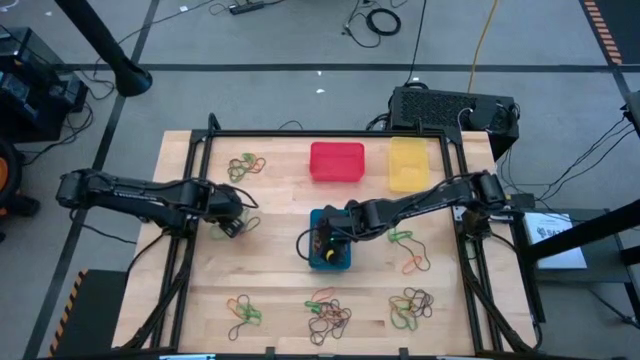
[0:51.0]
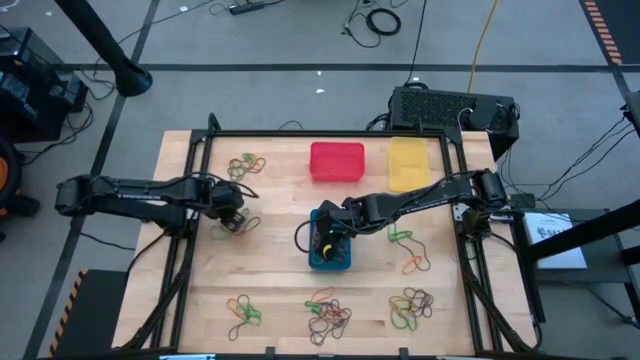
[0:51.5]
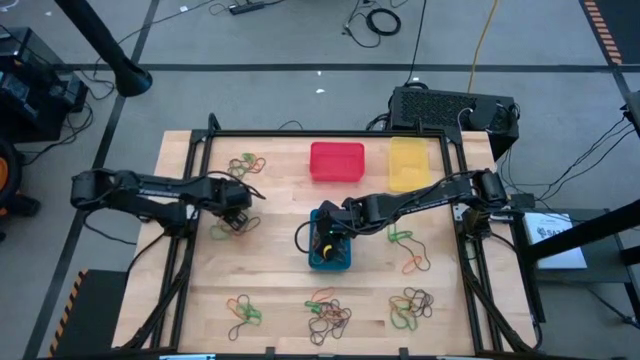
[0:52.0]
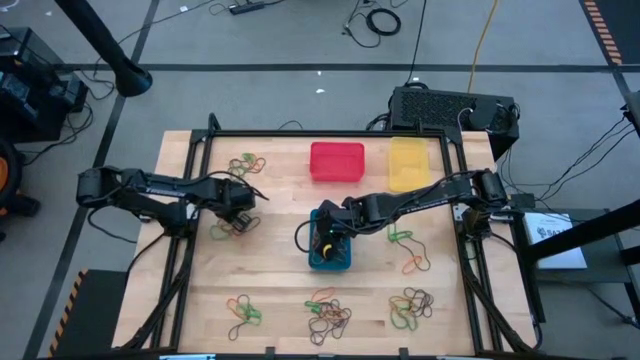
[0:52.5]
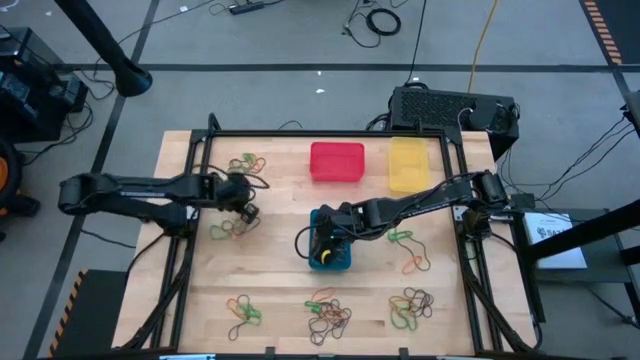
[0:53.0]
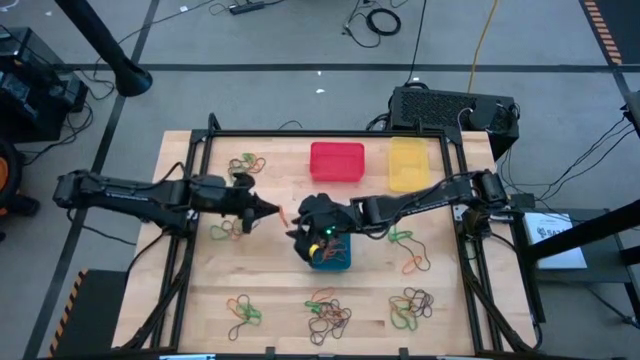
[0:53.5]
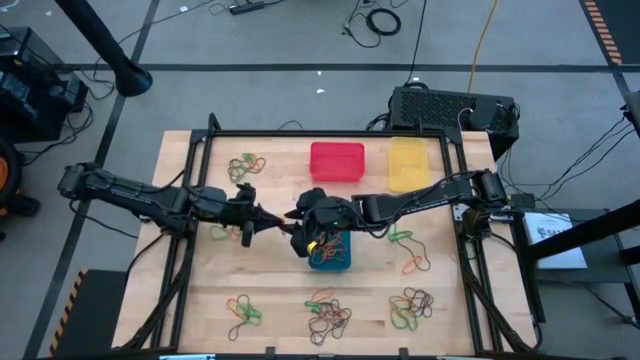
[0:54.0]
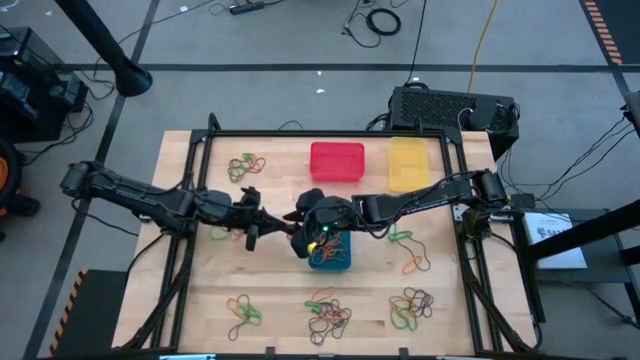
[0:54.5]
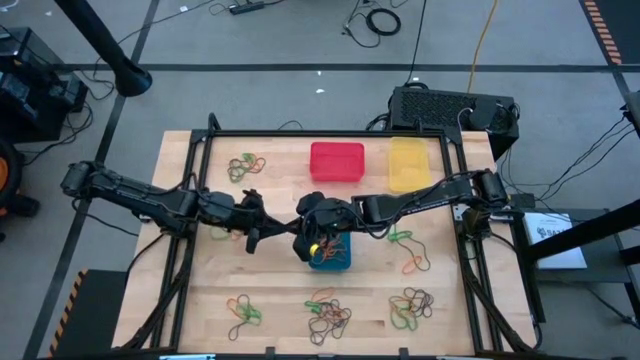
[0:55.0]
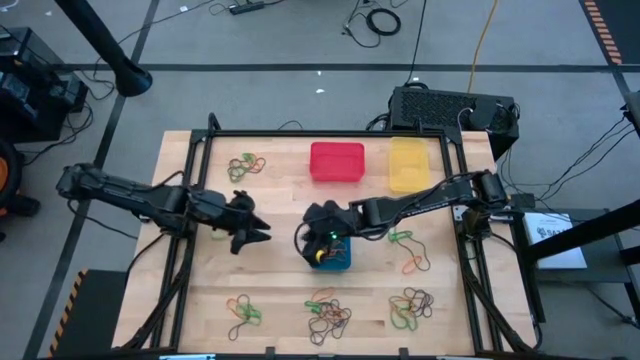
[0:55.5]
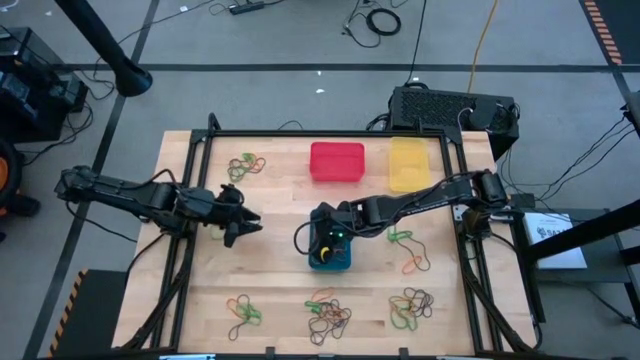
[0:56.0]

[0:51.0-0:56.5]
Task: Sort rubber bands into baskets
Put the orange rubber band into the blue bin

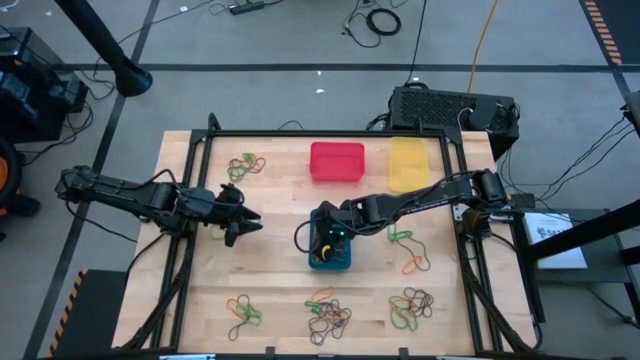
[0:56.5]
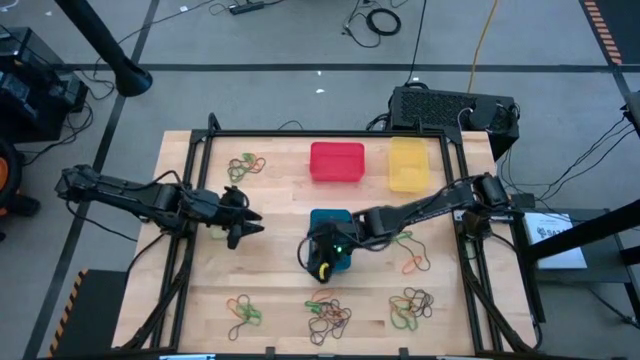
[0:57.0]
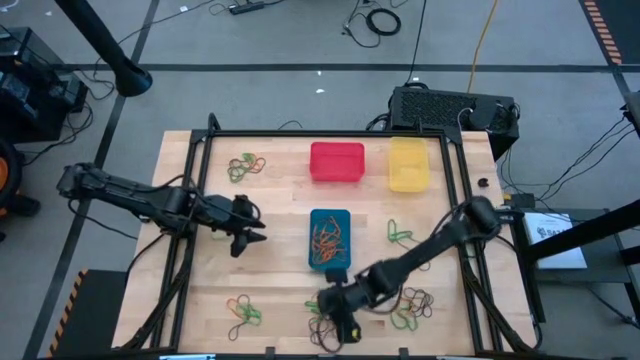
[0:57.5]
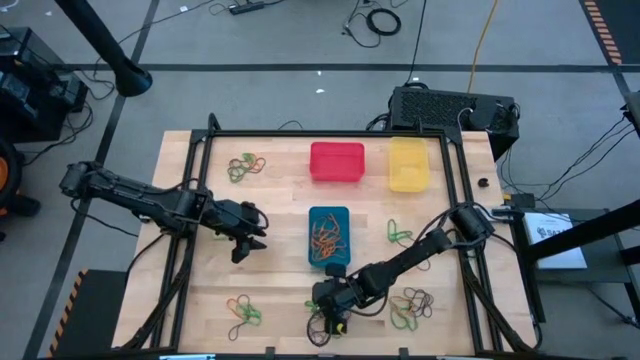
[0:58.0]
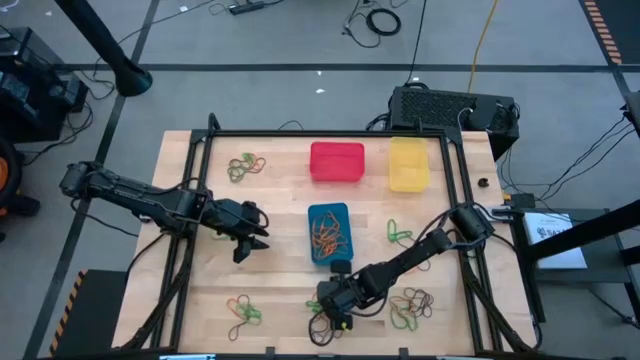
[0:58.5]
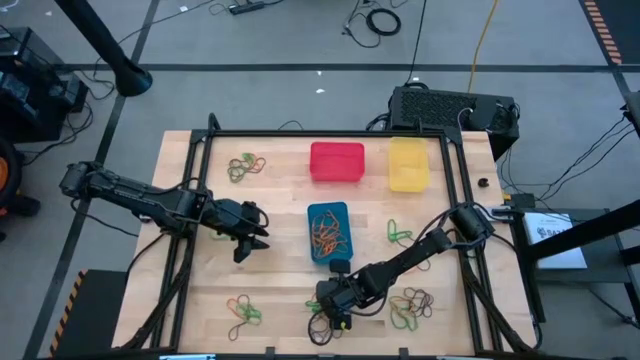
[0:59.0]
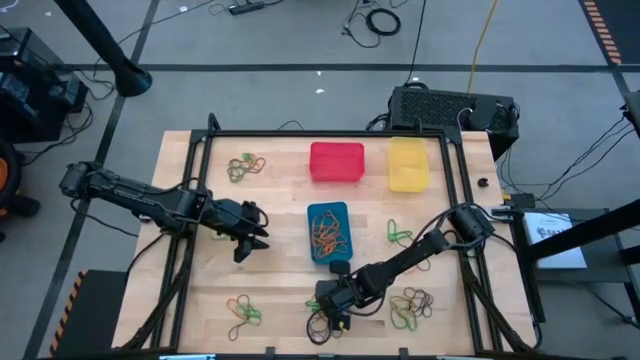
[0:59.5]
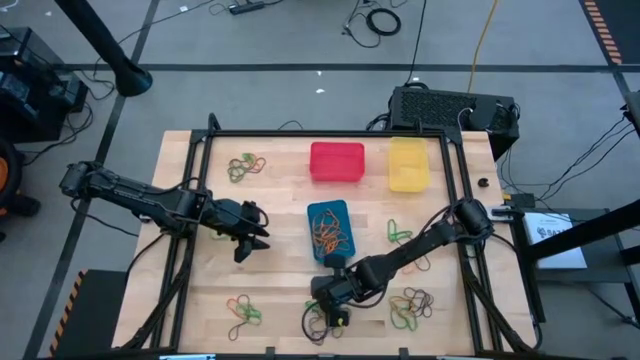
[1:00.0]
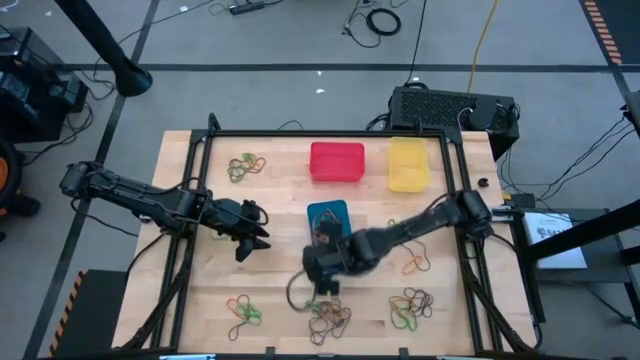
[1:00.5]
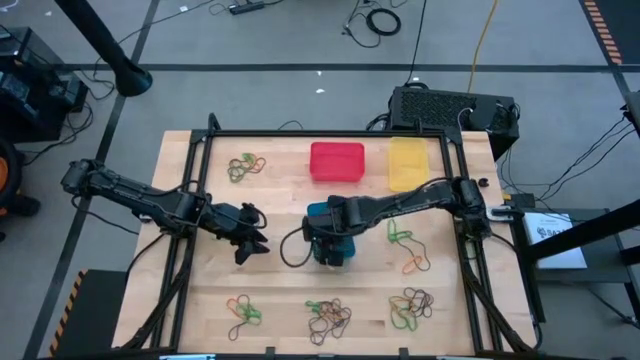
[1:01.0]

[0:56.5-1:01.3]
Put the orange rubber band into the blue bin

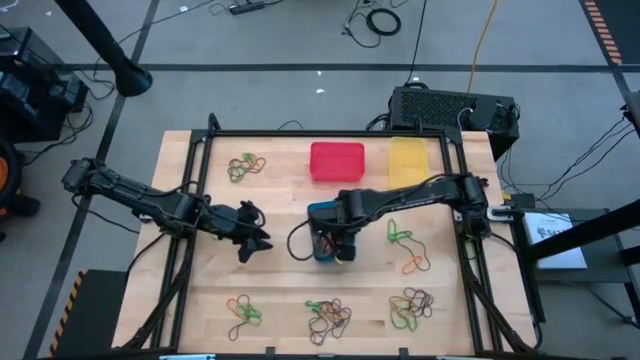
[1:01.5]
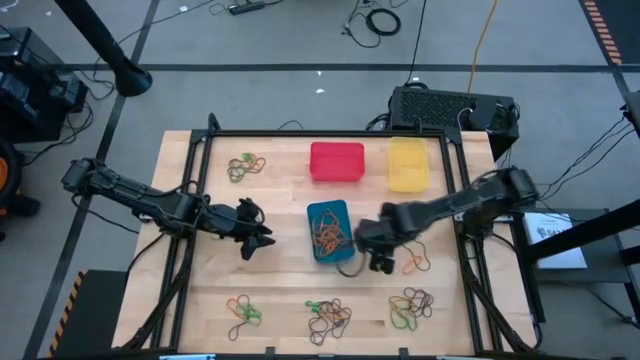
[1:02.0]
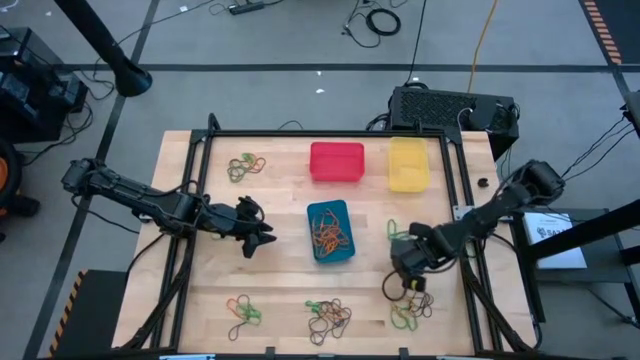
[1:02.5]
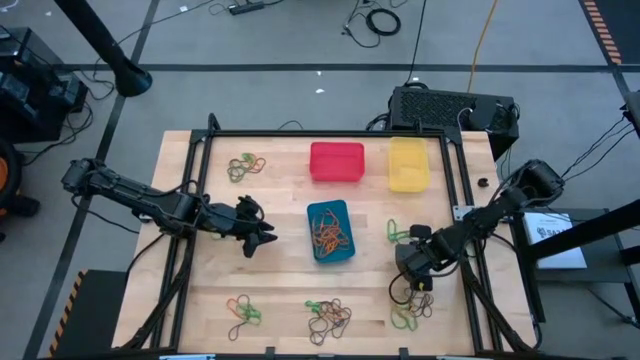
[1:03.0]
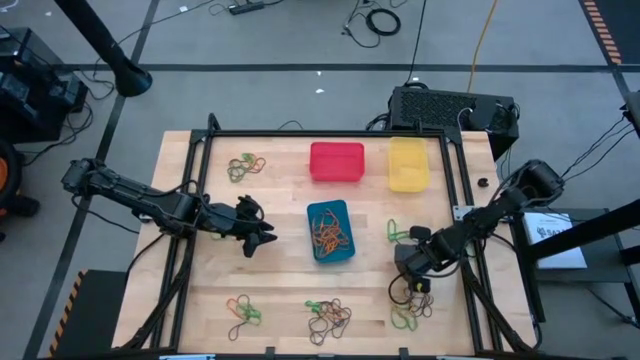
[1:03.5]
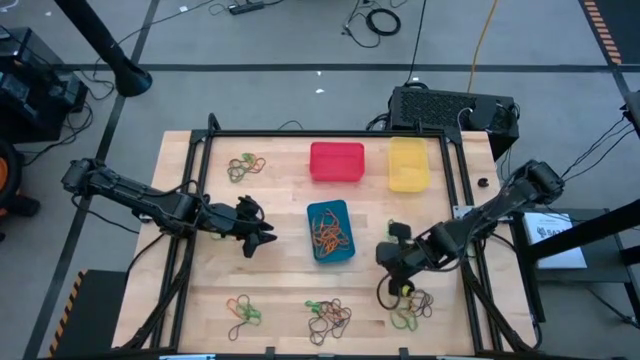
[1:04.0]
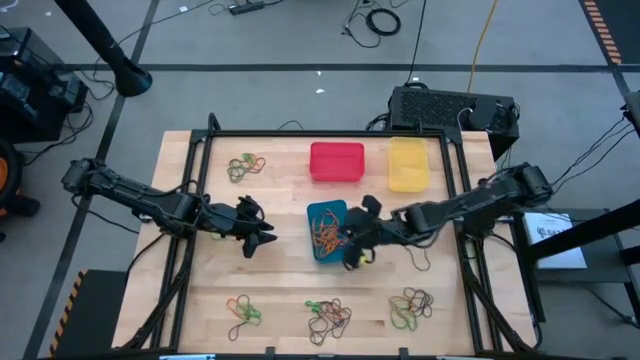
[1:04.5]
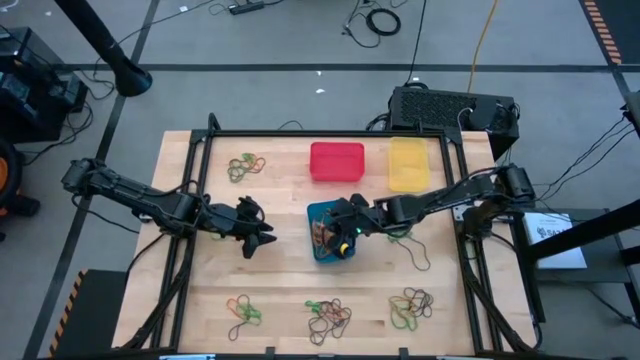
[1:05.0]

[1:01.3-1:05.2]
Put the orange rubber band into the blue bin

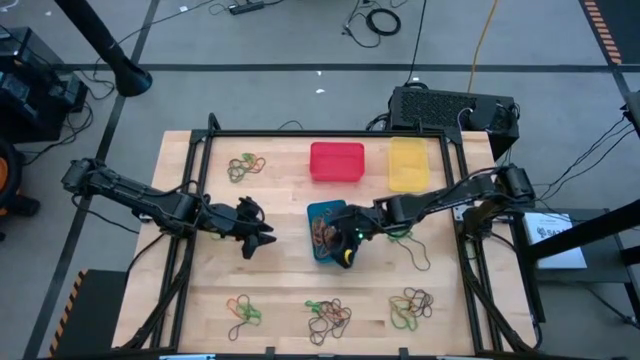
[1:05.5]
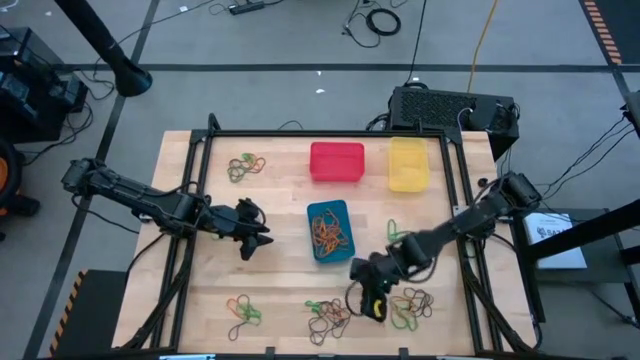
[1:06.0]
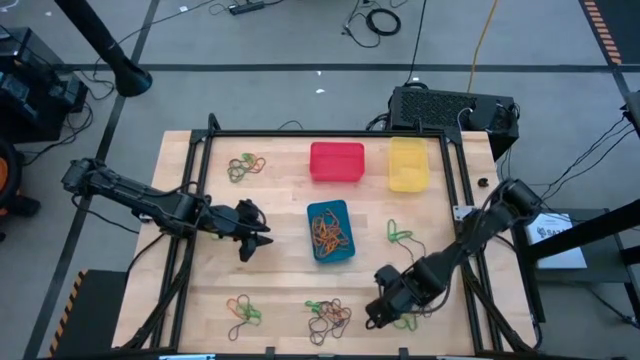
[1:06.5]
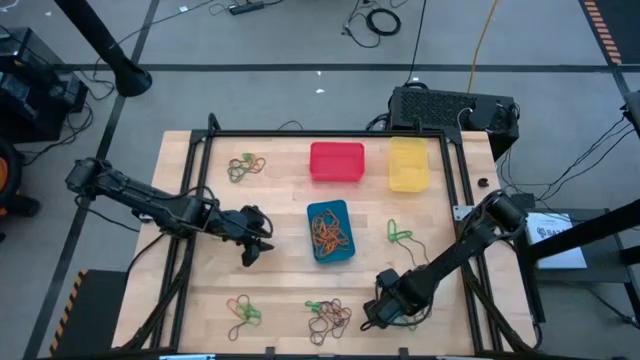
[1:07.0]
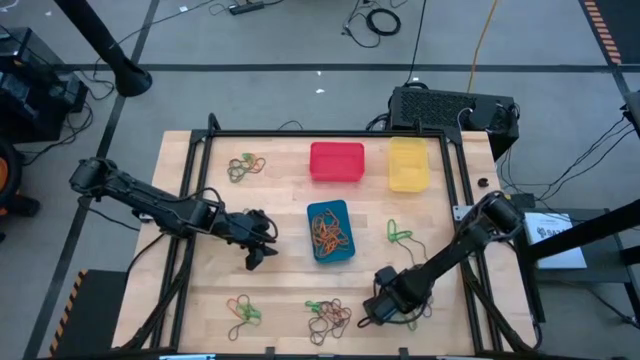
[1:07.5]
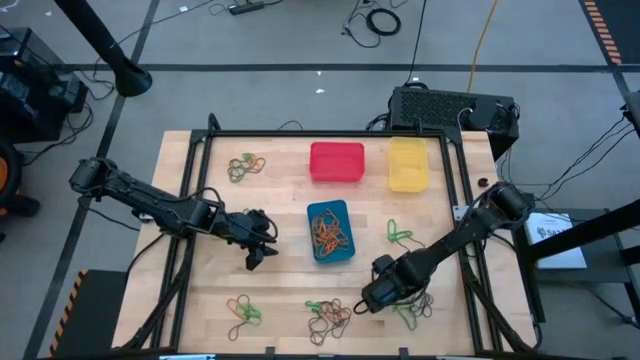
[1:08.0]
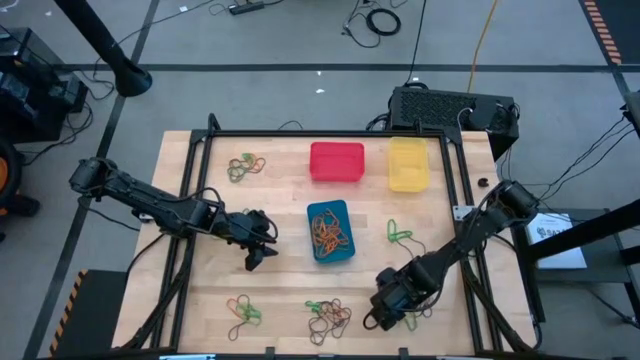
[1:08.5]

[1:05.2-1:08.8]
Put the orange rubber band into the blue bin

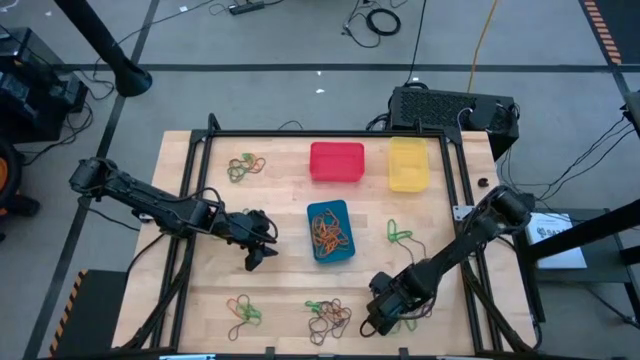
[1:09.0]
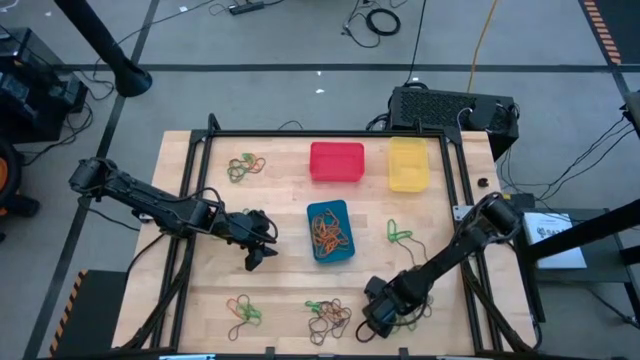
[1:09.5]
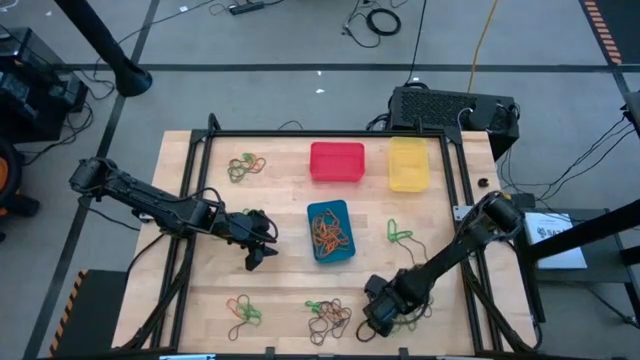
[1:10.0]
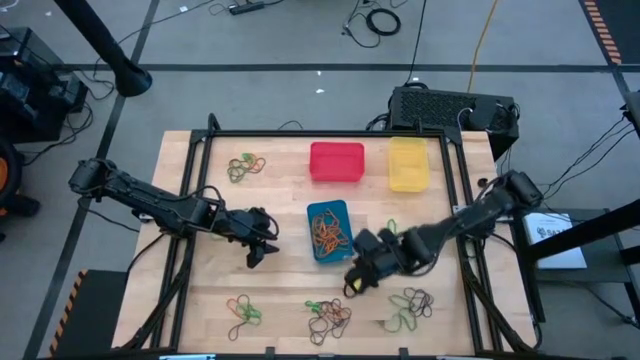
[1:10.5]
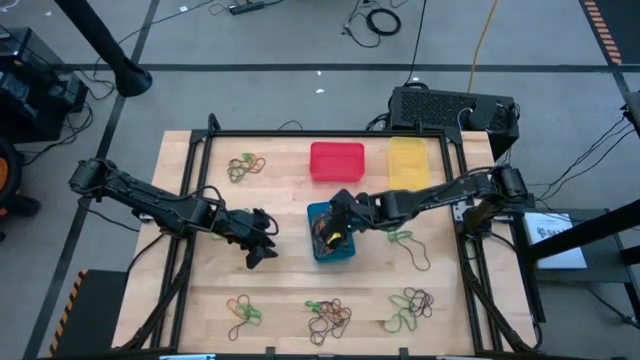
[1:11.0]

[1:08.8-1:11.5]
Put the orange rubber band into the blue bin
